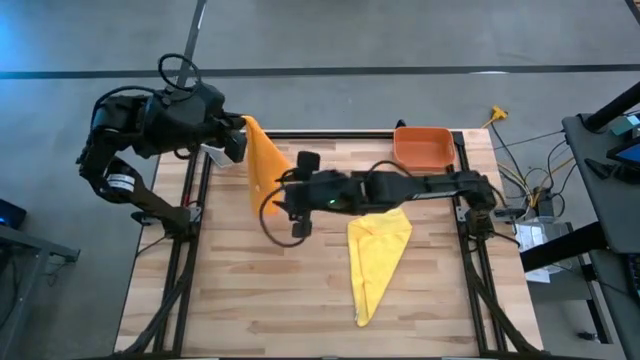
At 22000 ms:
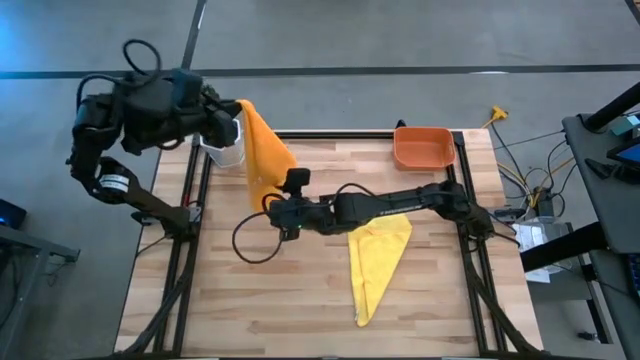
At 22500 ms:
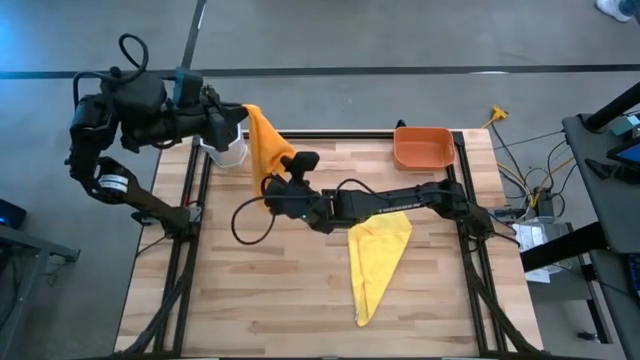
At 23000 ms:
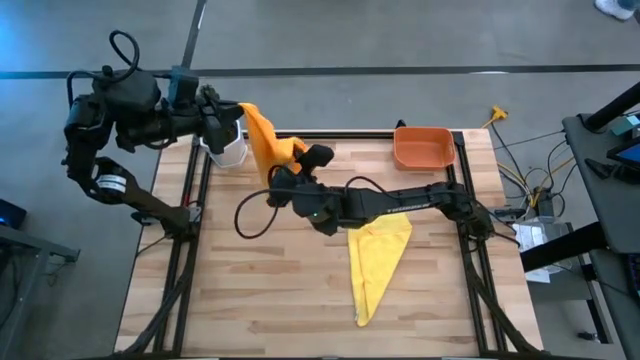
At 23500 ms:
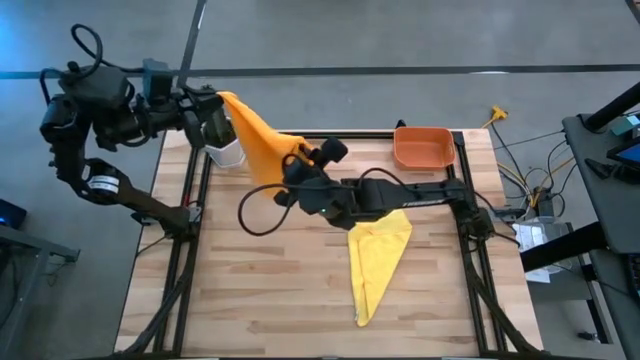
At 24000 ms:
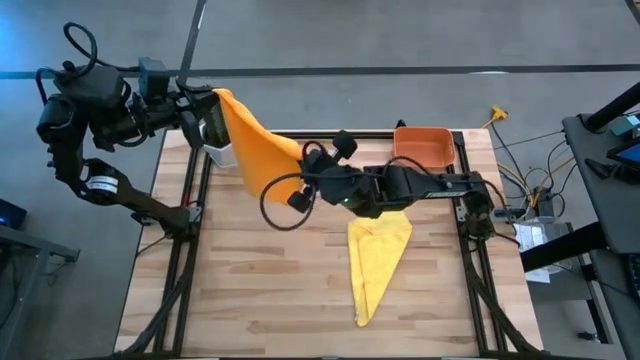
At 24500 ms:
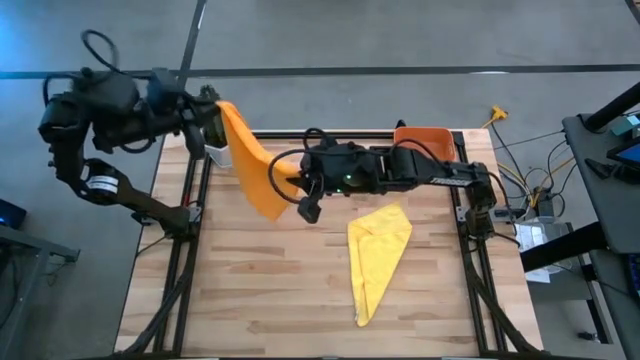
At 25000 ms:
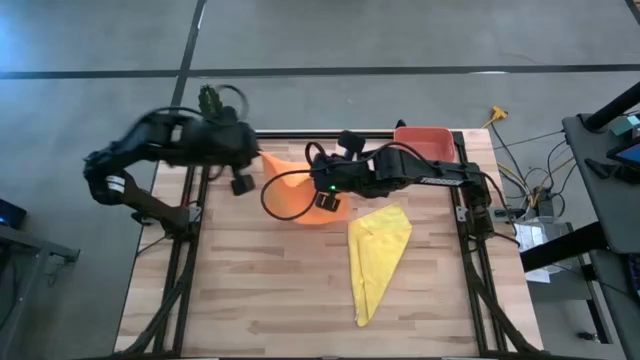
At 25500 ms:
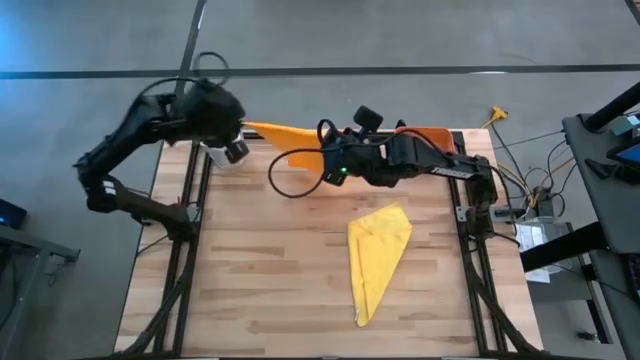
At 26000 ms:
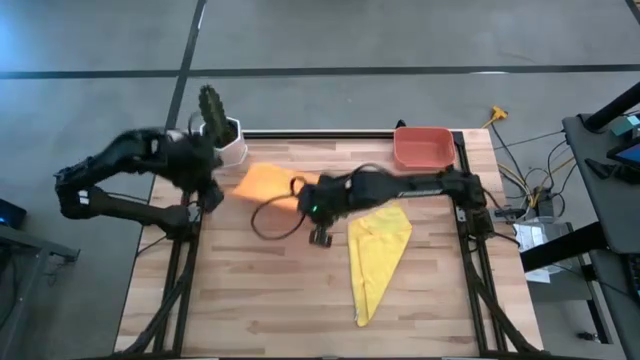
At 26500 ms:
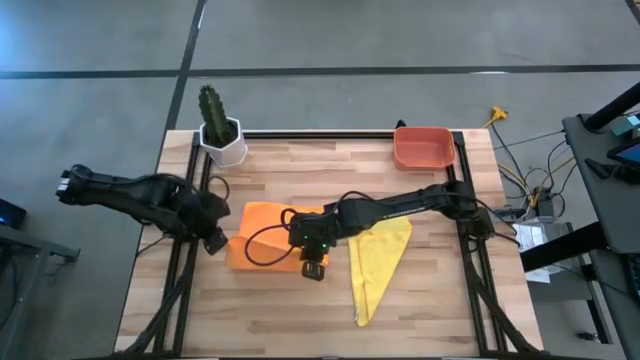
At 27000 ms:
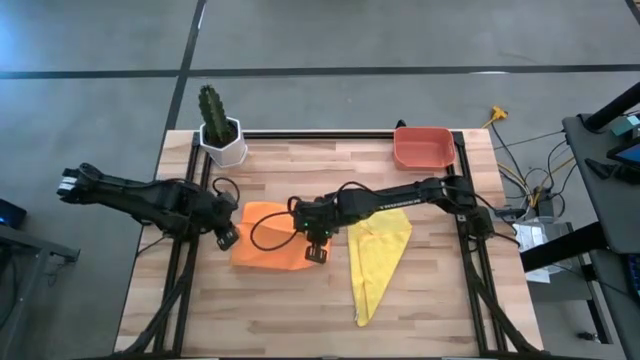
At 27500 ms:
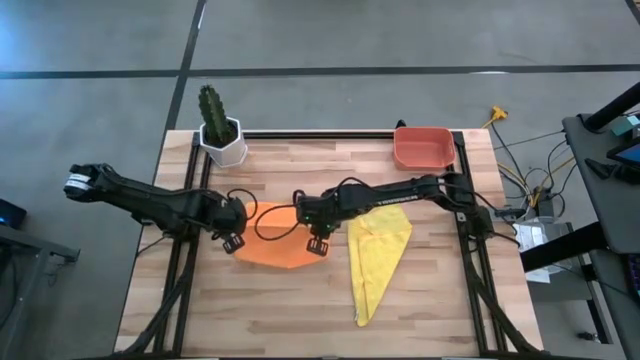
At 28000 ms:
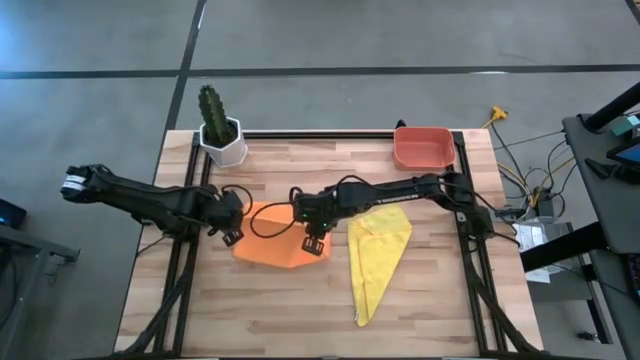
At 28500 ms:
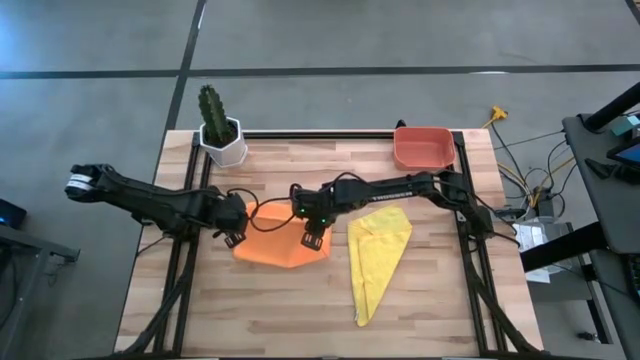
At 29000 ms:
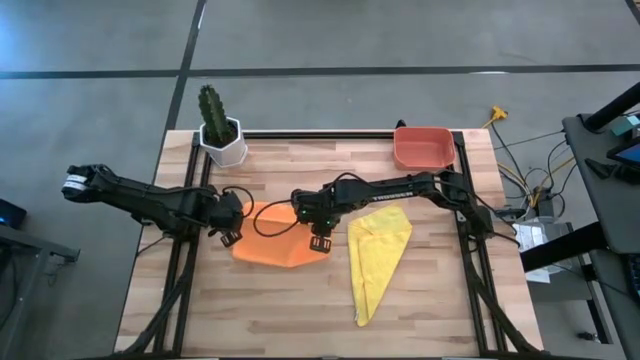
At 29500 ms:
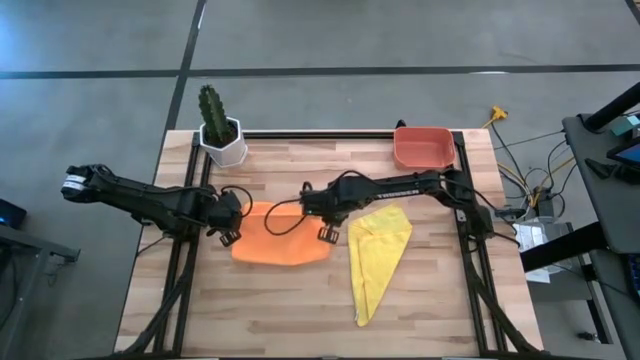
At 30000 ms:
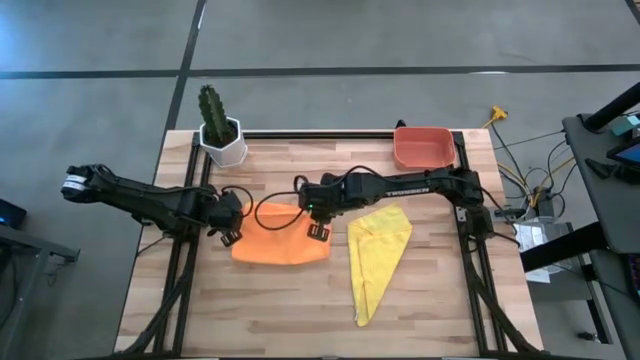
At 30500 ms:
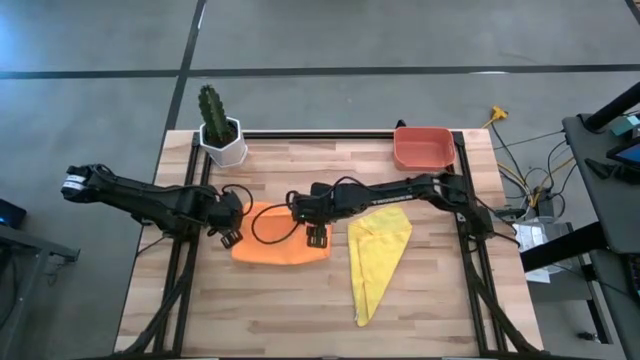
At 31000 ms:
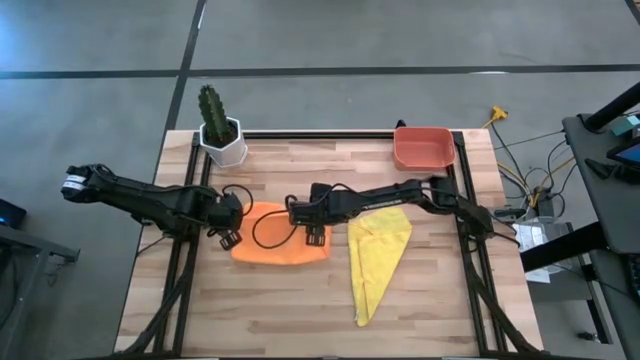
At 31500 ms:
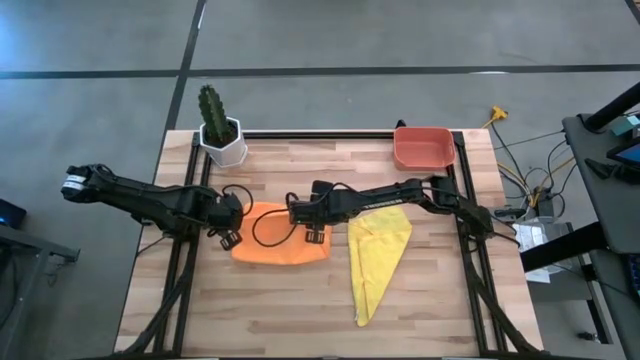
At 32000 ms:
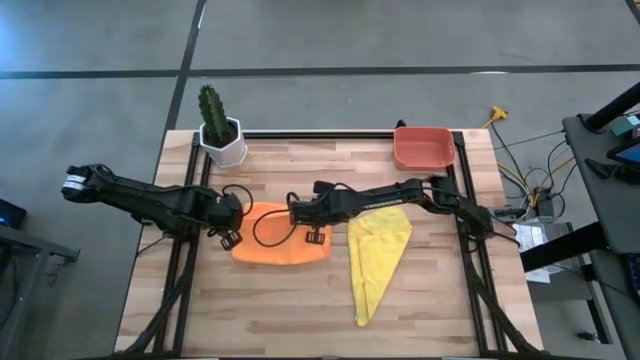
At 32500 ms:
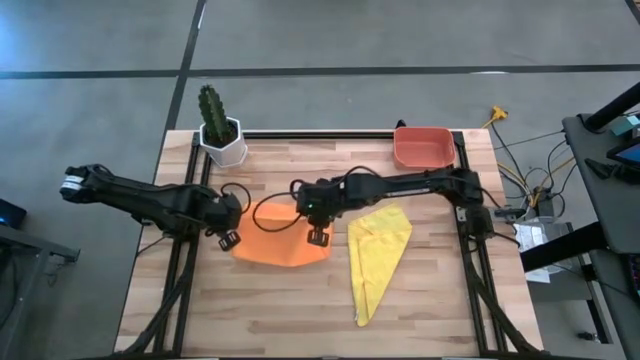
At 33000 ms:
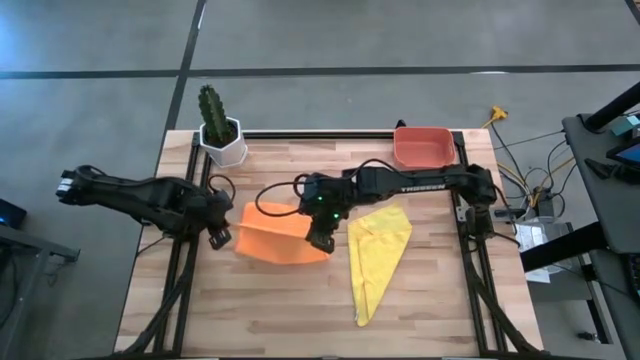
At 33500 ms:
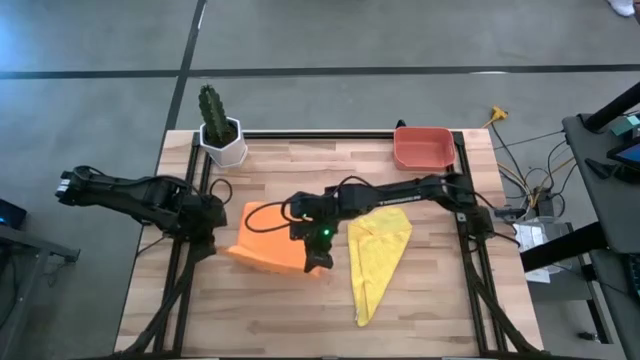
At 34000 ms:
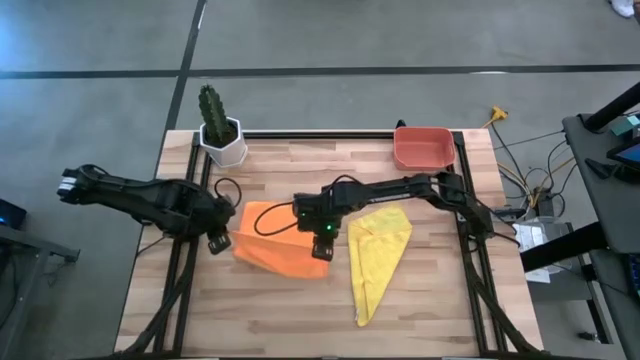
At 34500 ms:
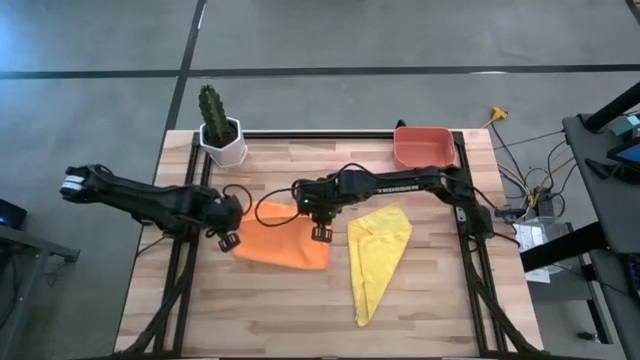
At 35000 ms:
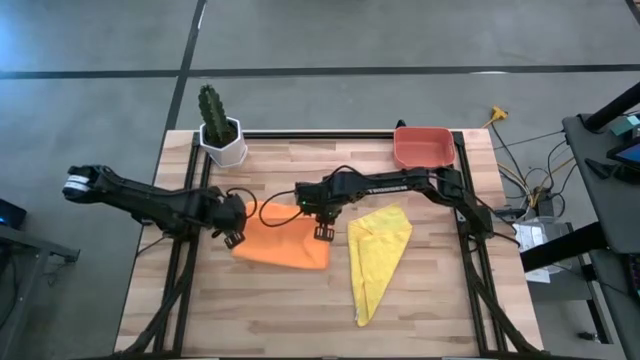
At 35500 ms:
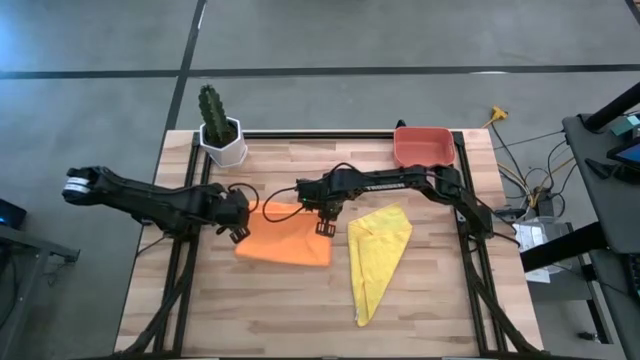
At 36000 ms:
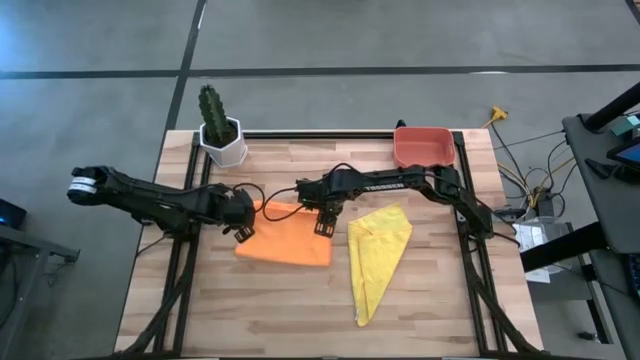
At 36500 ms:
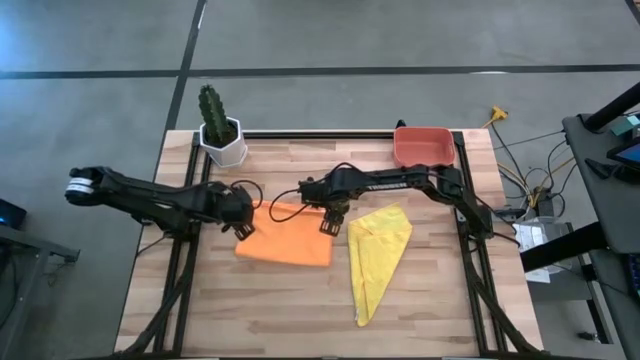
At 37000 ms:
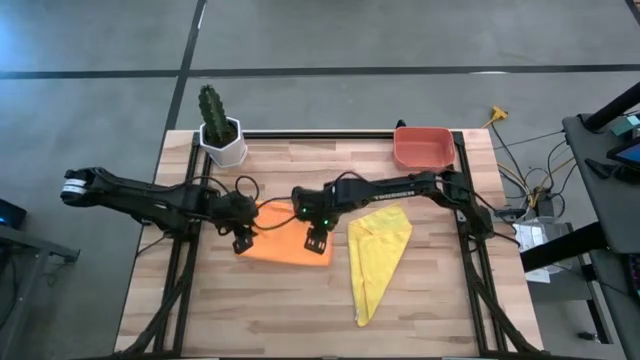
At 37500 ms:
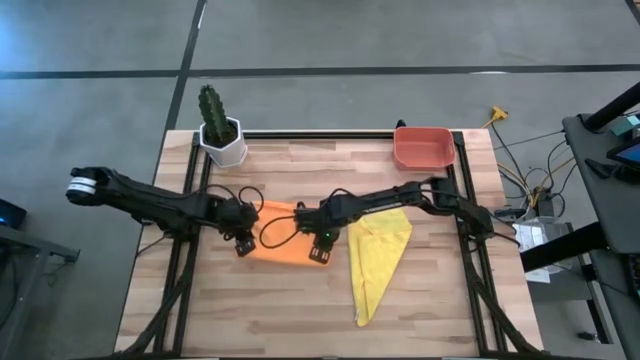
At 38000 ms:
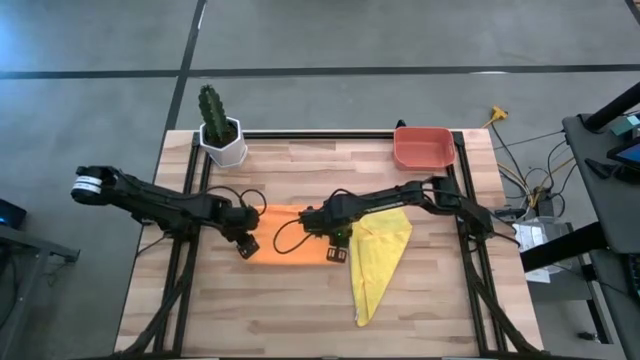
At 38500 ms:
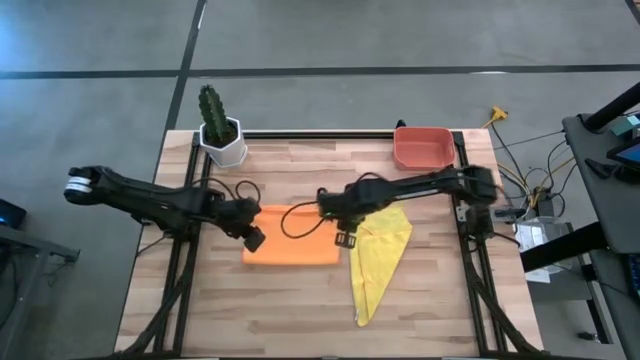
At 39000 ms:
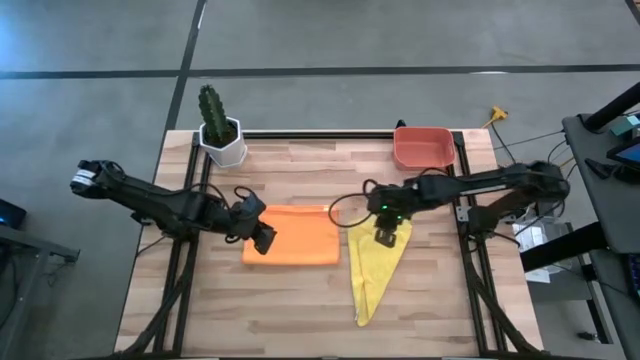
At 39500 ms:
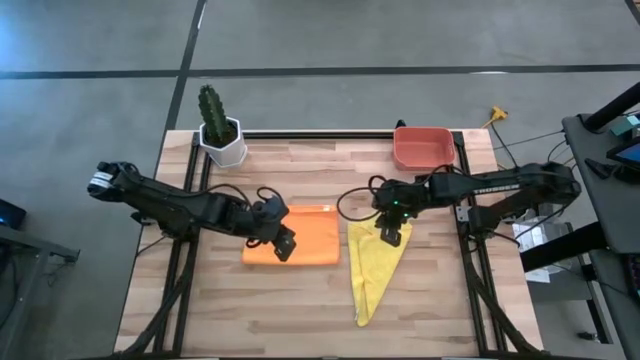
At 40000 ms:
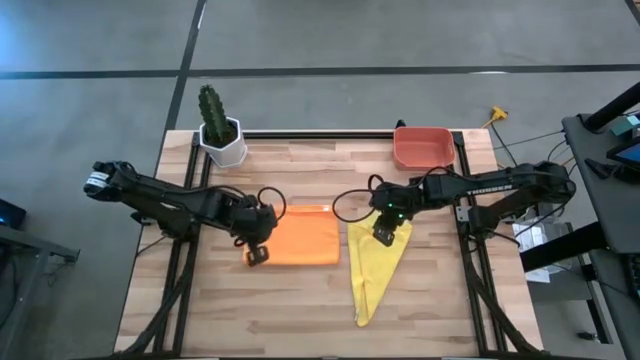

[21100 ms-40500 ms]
Task: Roll microfiber towels into tight, uniform cylinder then place into a basket
Fold the orange towel
